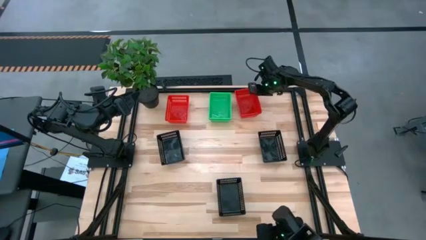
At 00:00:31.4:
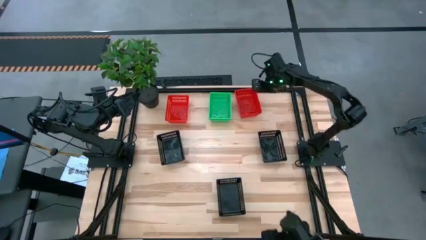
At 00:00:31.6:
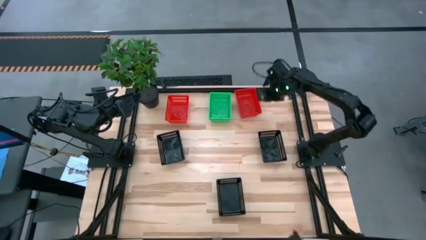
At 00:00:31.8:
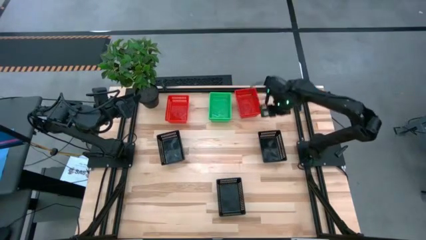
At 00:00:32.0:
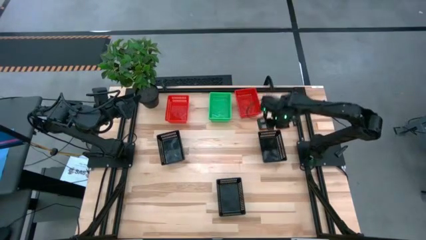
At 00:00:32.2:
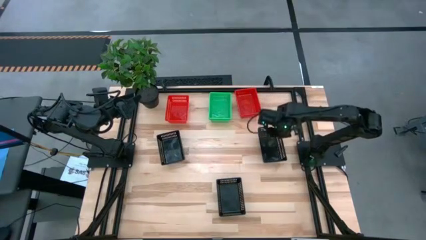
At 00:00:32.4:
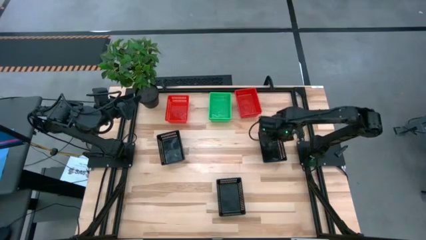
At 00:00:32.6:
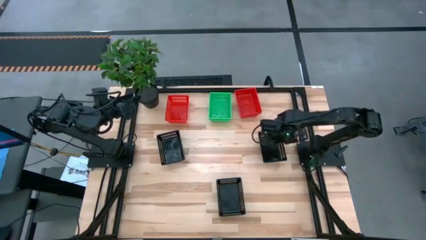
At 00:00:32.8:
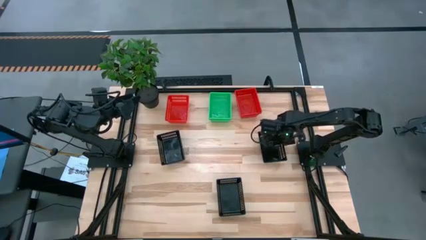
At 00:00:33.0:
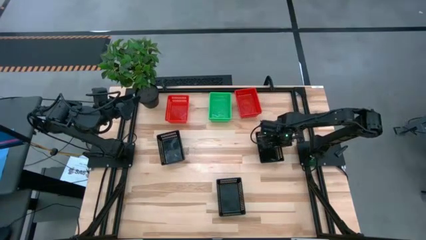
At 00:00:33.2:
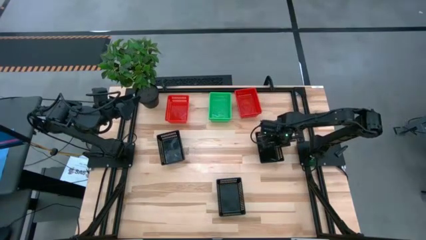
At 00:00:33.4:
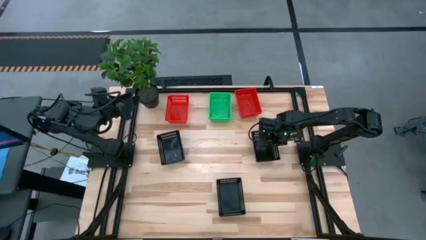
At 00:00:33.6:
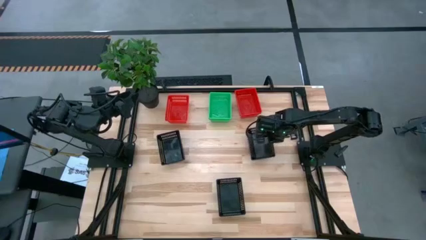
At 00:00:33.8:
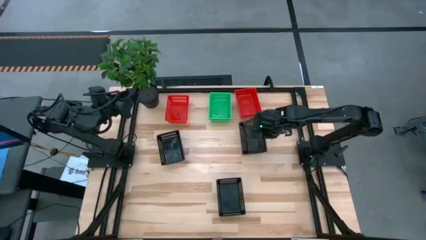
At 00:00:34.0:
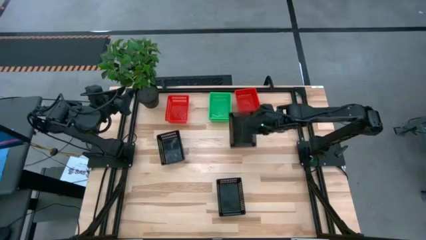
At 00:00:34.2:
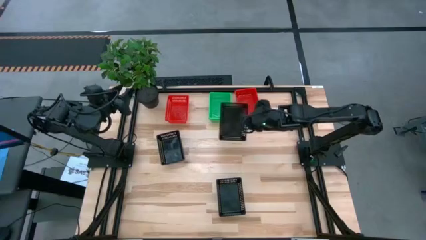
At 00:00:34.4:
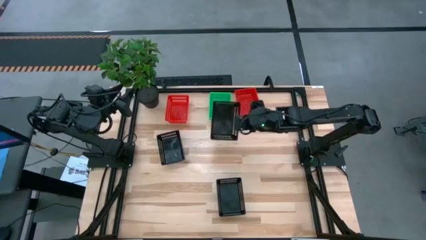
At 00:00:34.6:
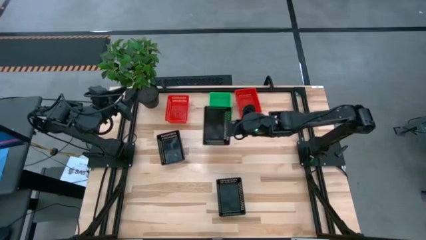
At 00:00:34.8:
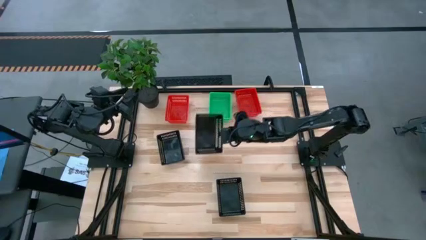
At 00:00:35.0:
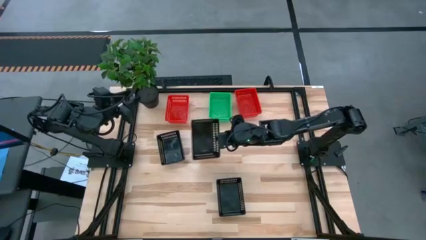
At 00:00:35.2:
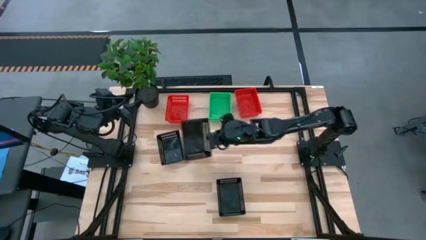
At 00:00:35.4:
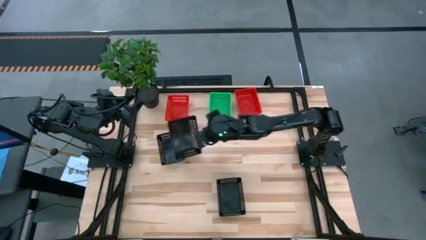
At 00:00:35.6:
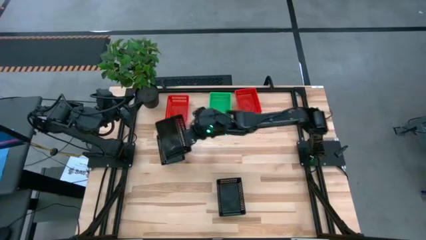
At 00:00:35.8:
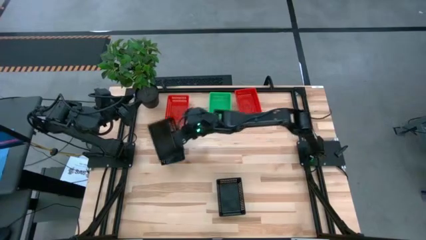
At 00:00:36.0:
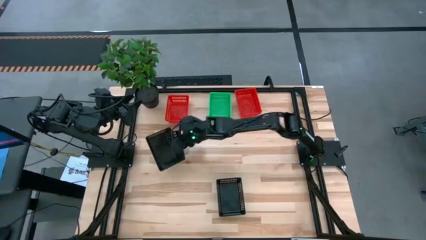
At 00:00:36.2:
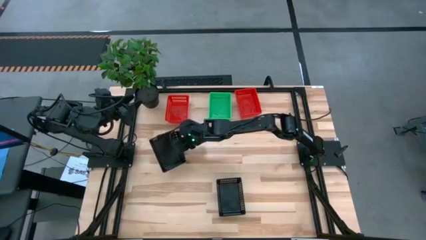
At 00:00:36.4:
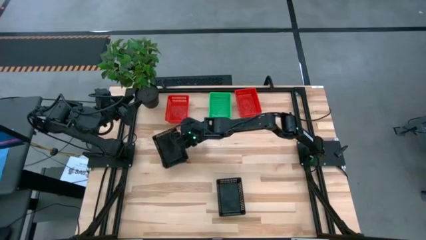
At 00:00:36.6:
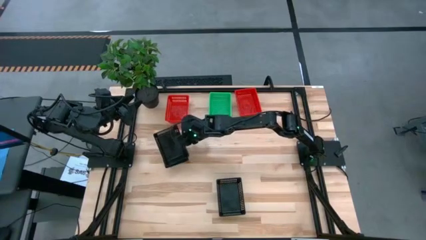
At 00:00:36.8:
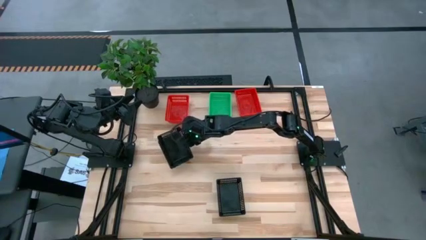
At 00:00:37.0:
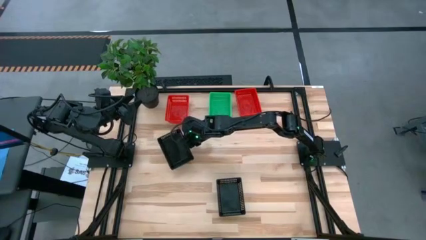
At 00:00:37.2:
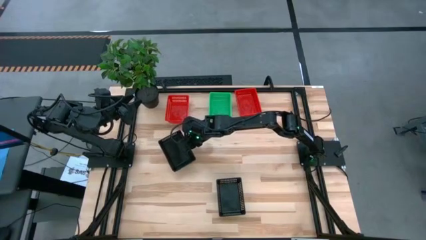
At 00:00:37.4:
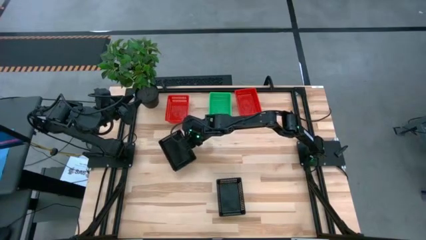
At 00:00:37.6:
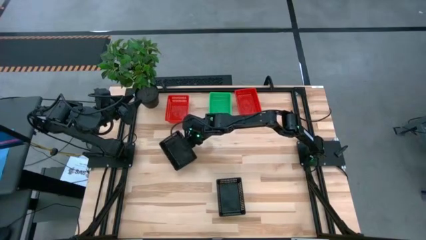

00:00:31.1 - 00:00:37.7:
Stack the top right black bin on the top left black bin

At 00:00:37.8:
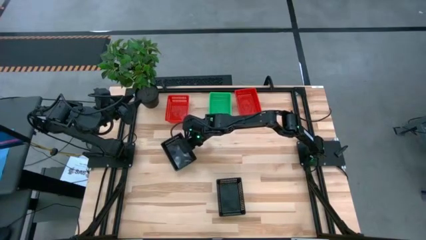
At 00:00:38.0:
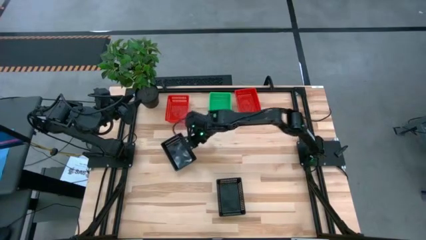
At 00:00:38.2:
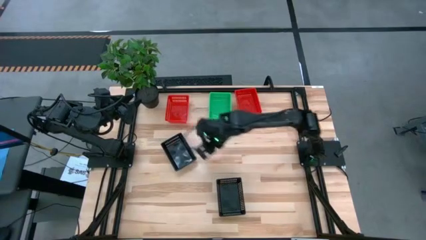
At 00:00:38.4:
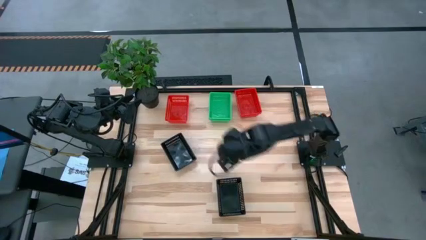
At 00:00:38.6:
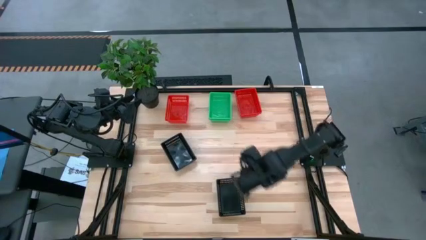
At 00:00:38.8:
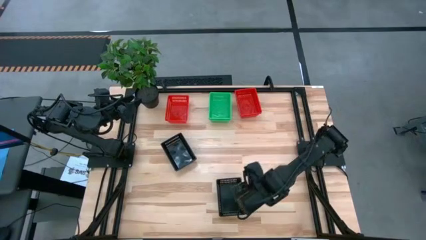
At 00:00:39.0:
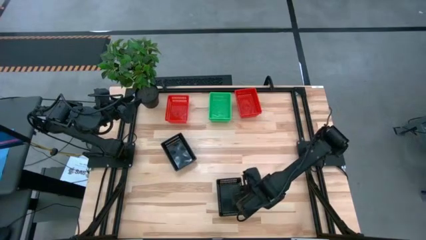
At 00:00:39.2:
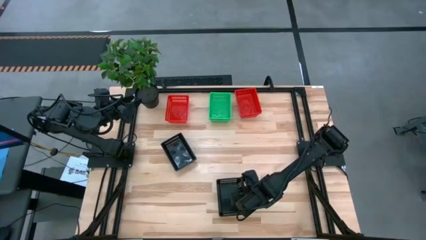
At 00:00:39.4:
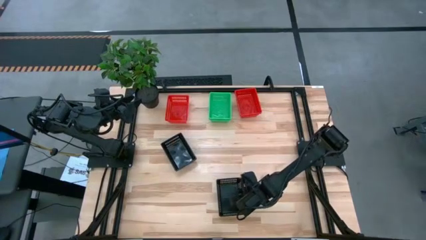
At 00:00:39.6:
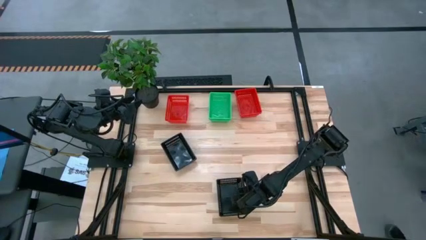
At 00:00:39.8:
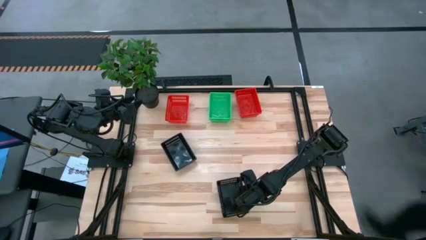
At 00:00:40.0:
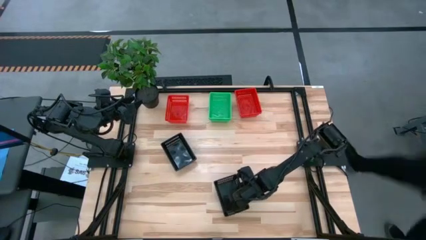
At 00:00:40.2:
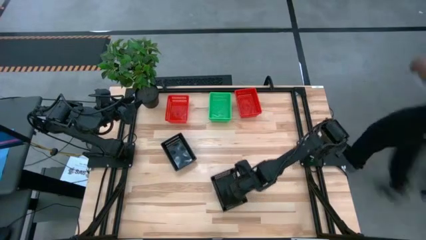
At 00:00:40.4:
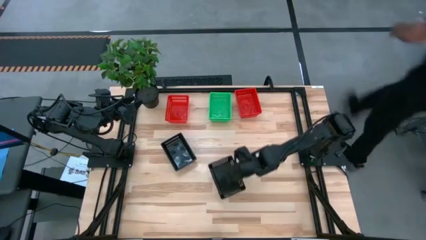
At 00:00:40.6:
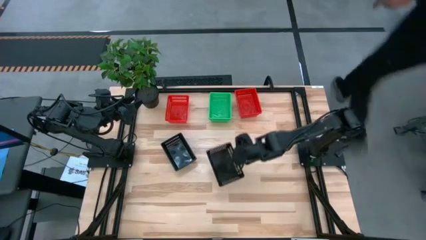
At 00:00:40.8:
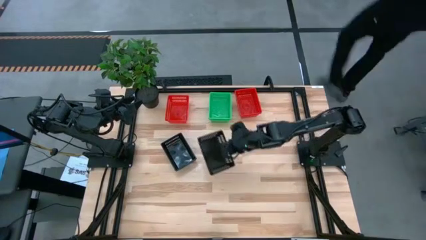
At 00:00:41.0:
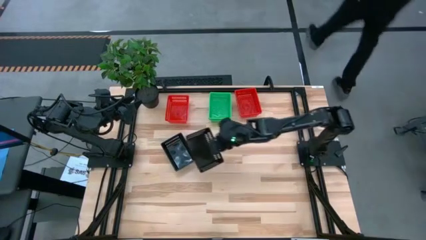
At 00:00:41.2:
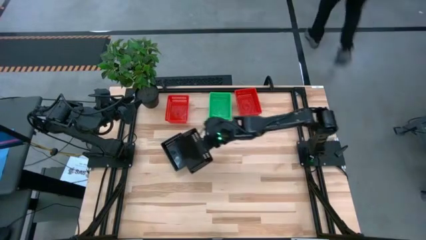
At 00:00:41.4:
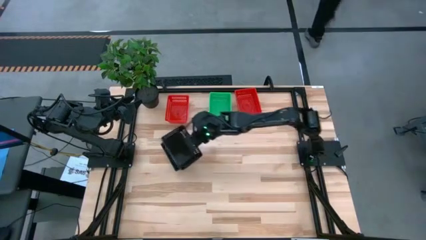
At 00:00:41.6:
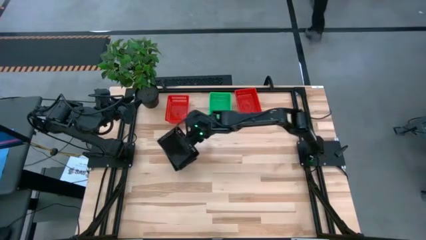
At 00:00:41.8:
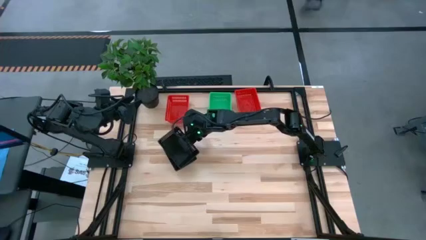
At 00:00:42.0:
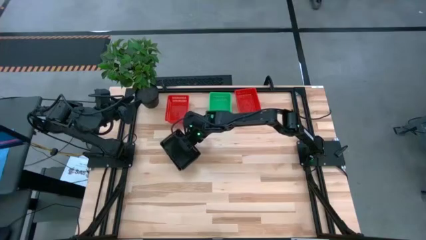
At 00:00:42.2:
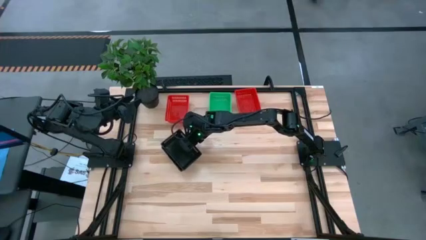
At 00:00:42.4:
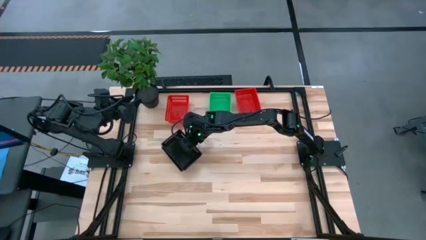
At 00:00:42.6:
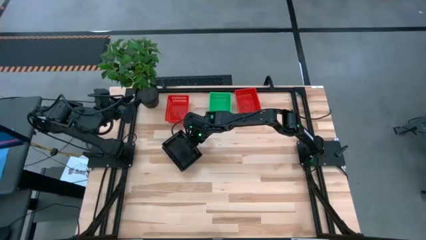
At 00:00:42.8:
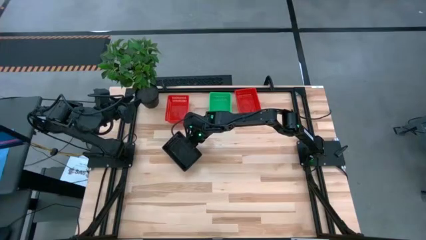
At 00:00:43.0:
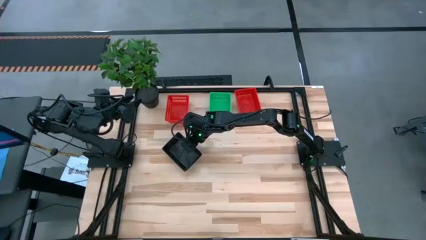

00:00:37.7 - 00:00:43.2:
Stack the bottom black bin on the stacked black bins

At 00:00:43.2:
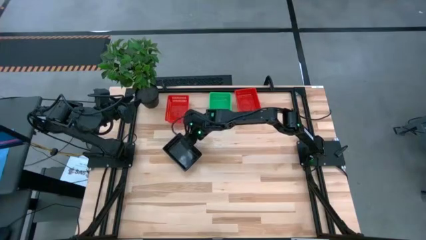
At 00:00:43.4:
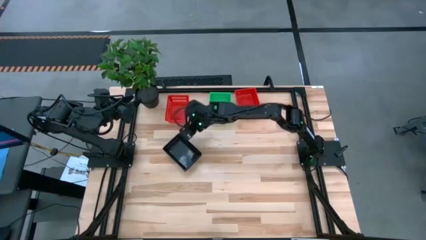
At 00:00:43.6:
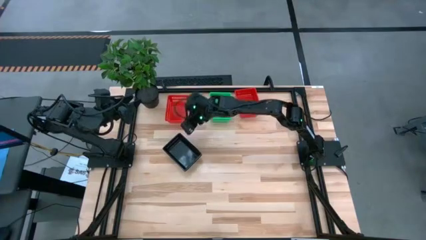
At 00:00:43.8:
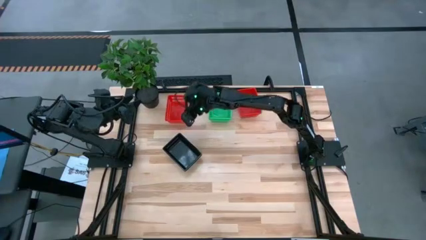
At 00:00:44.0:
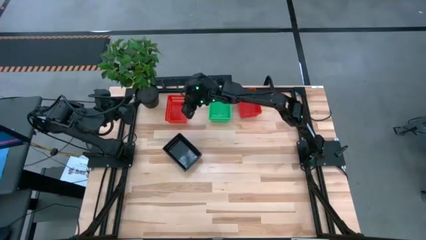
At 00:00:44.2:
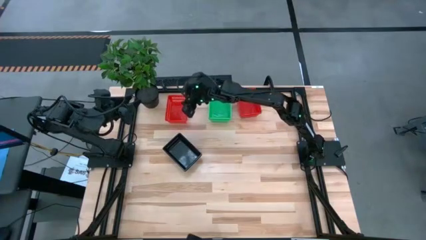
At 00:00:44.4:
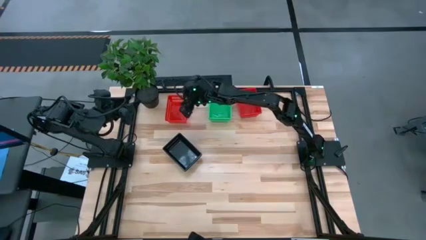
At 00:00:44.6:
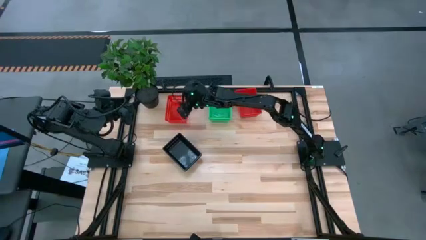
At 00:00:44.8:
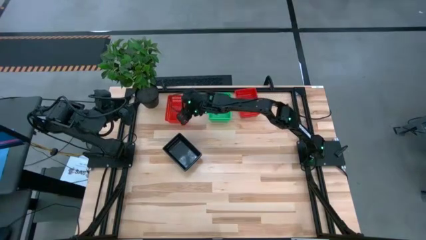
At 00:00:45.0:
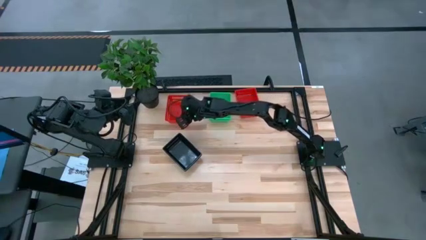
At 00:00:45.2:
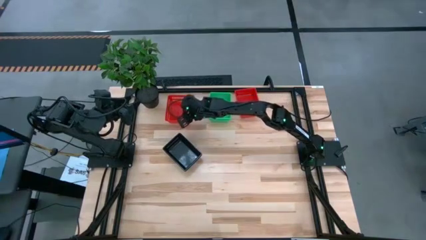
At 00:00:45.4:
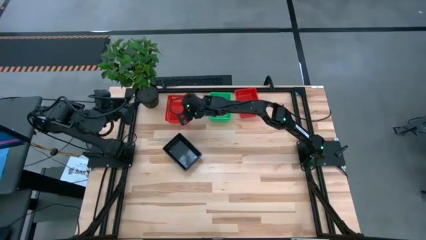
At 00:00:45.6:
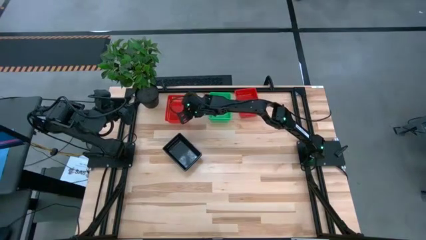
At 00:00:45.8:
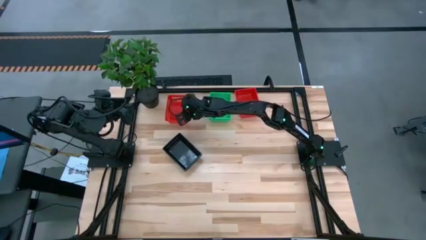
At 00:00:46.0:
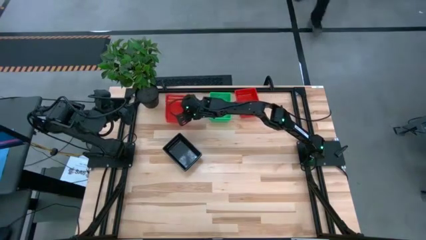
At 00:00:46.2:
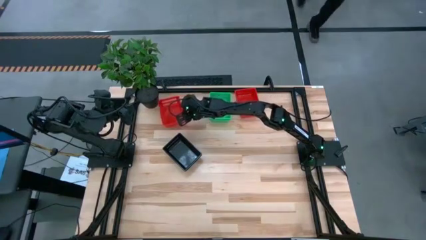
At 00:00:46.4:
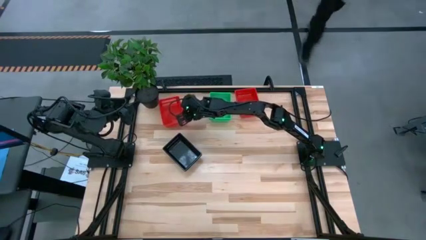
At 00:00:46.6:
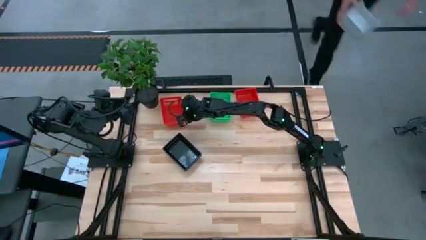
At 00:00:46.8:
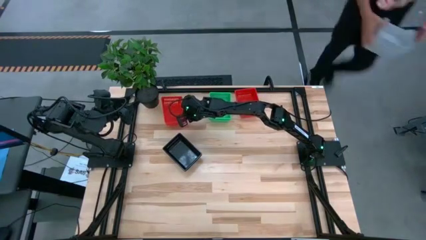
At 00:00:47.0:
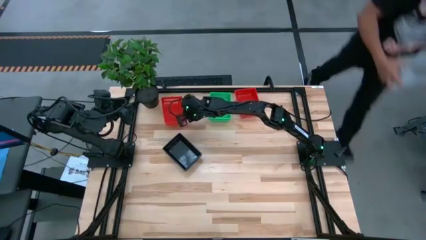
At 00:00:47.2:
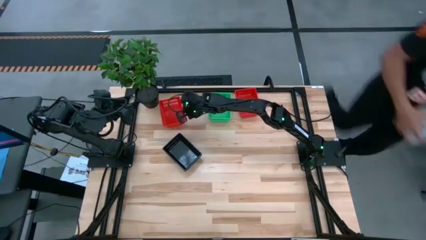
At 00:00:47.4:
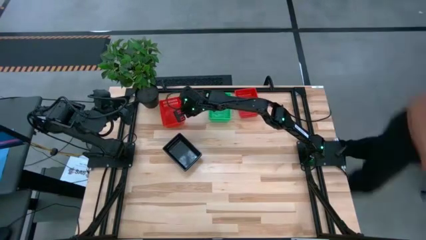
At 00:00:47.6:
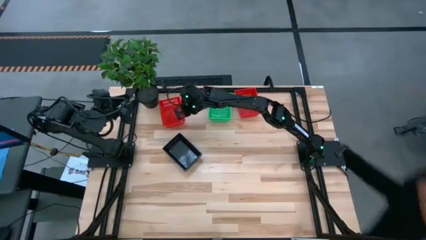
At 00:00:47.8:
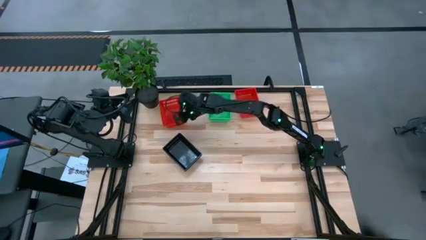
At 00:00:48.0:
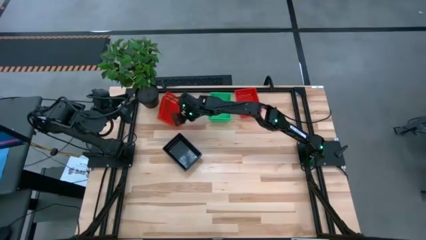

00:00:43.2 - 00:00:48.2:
Stack the left red bin on the stacked red bins
